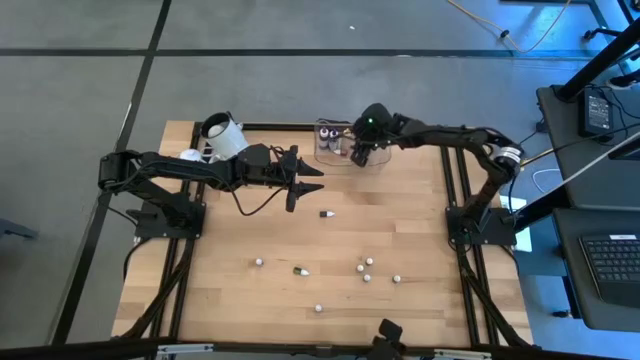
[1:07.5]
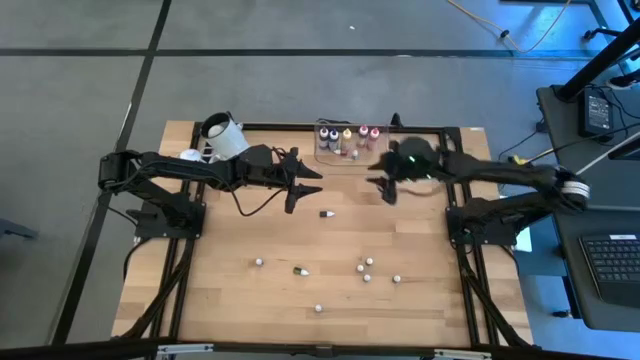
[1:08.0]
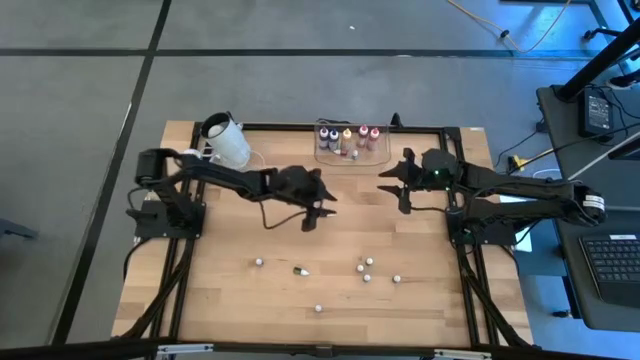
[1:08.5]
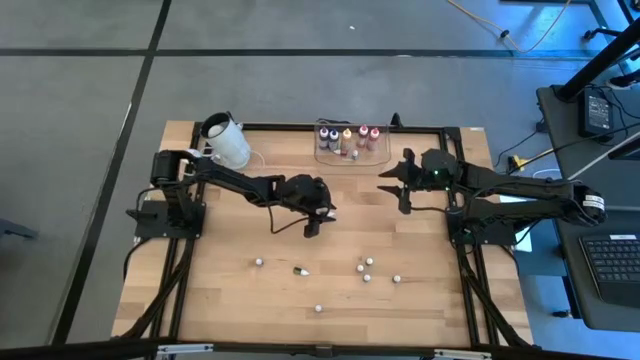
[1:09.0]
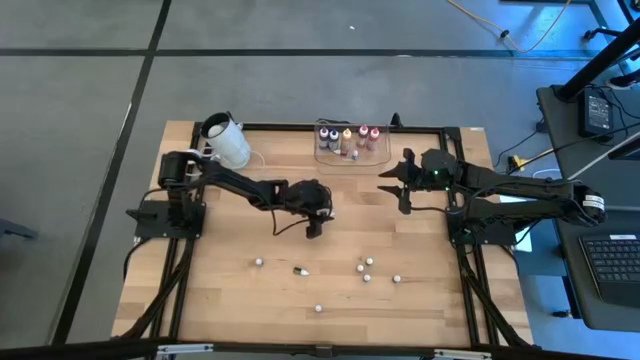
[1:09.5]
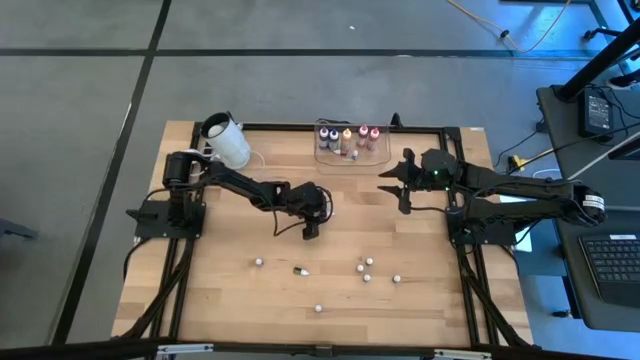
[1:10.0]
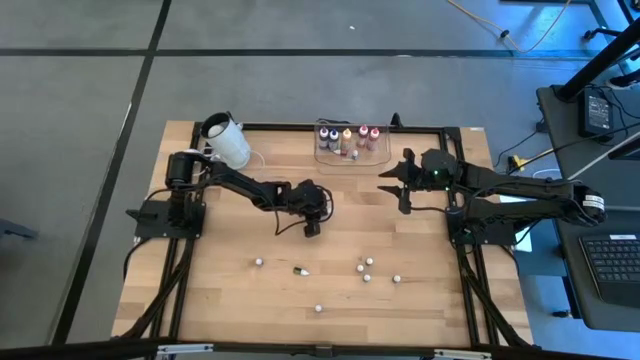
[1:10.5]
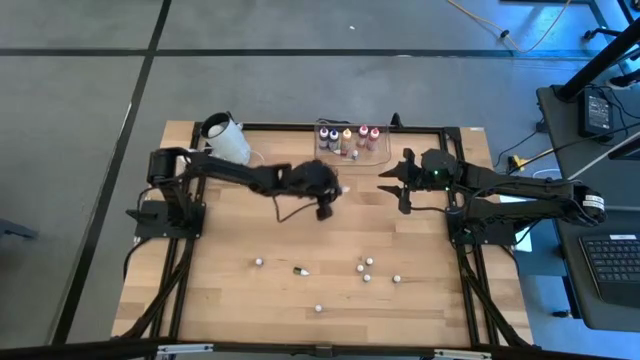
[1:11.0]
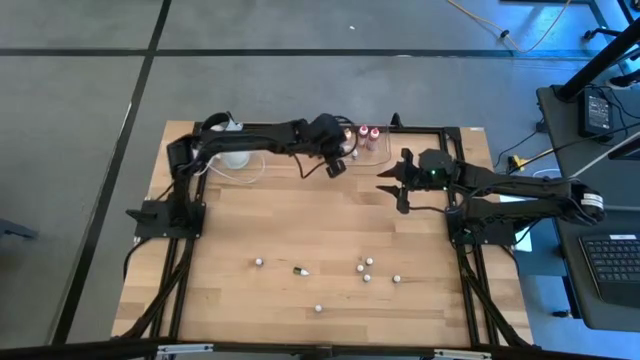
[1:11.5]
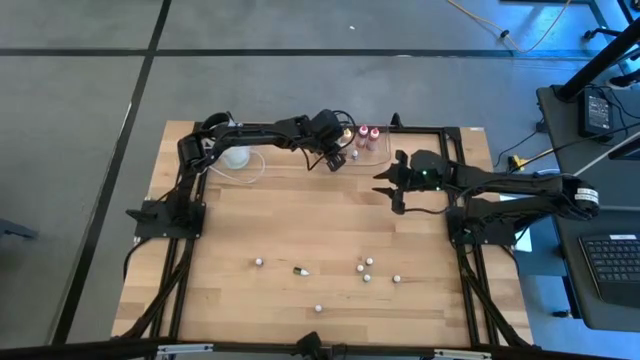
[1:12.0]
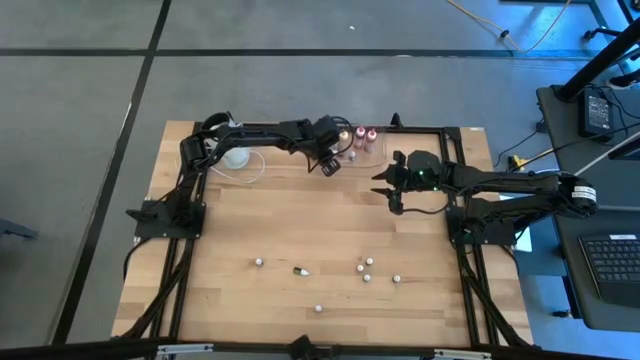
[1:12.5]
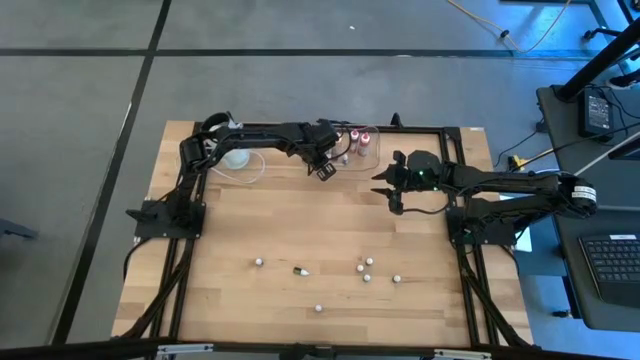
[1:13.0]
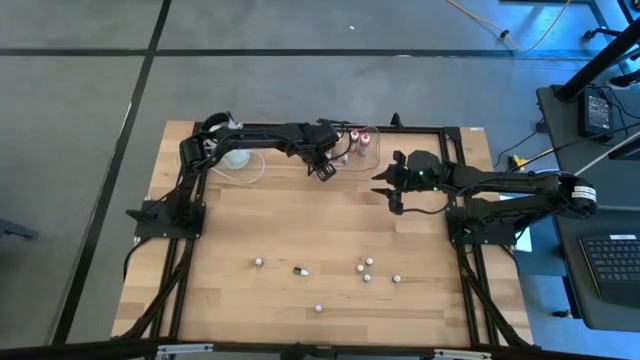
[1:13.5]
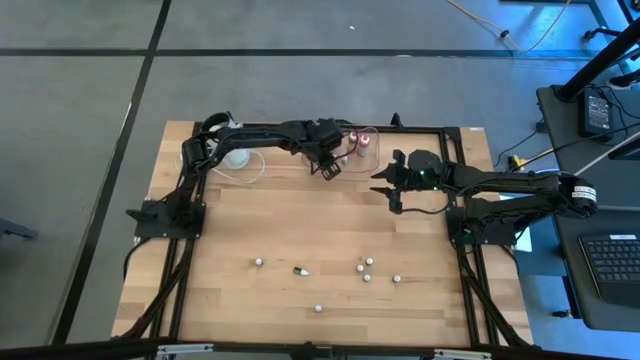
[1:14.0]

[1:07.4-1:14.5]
Task: Pick & Place food coloring
Put the small purple food coloring bottle into the transparent container

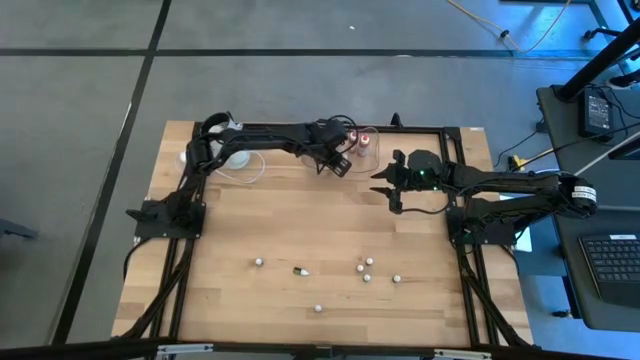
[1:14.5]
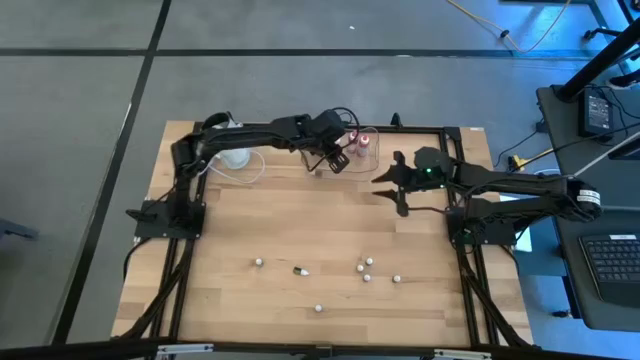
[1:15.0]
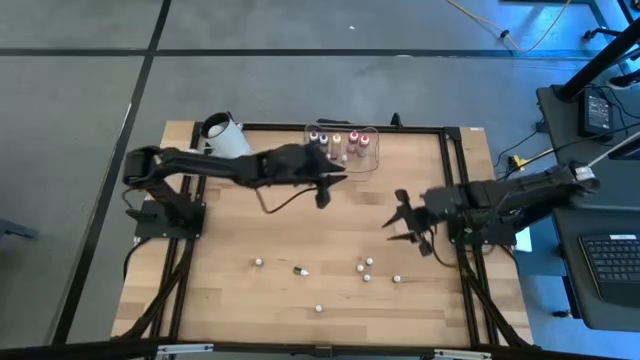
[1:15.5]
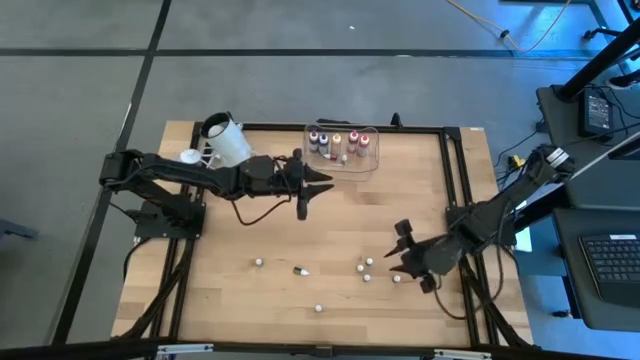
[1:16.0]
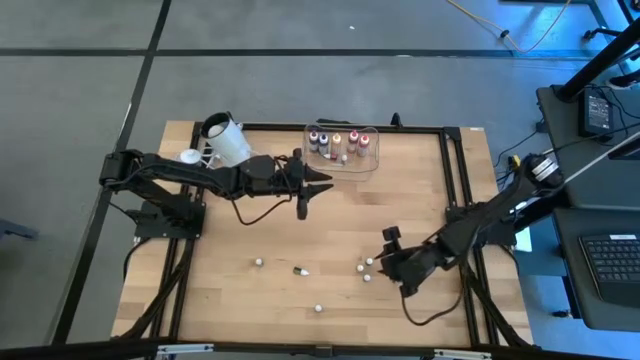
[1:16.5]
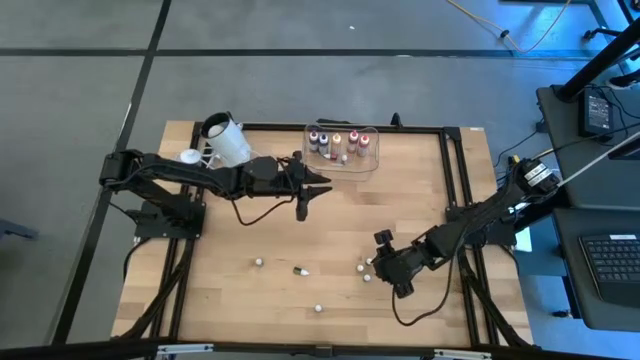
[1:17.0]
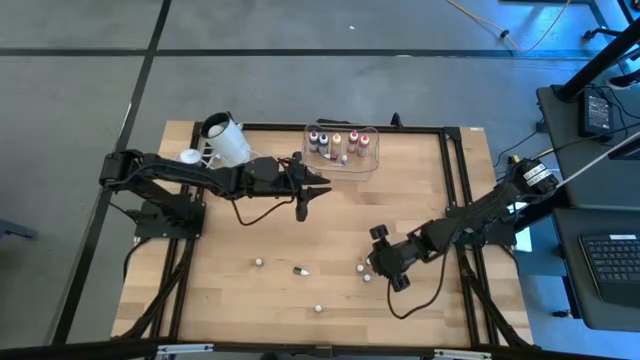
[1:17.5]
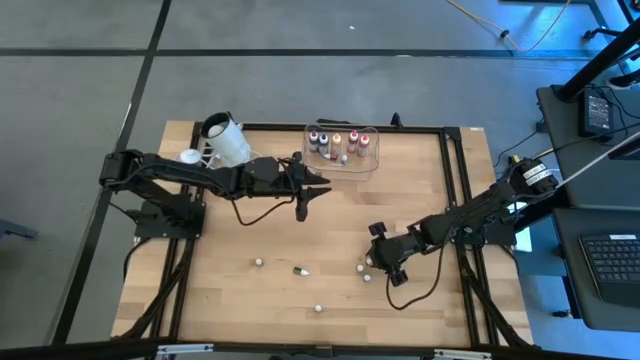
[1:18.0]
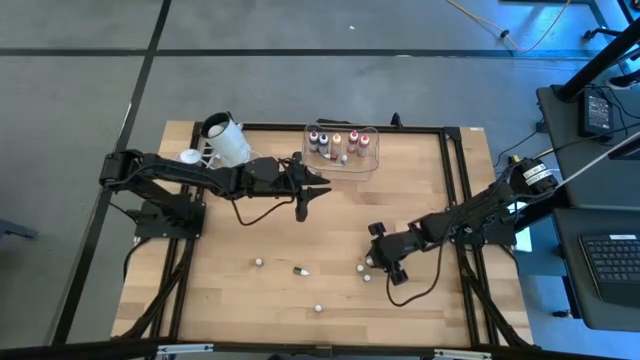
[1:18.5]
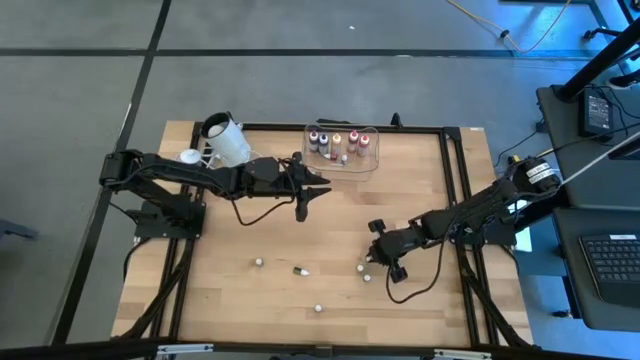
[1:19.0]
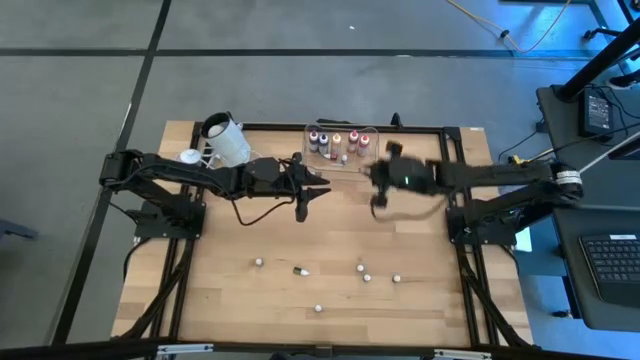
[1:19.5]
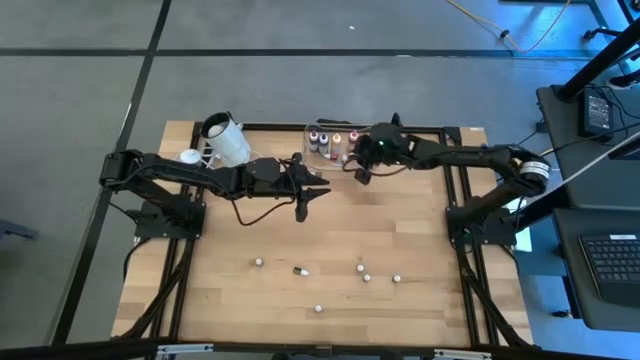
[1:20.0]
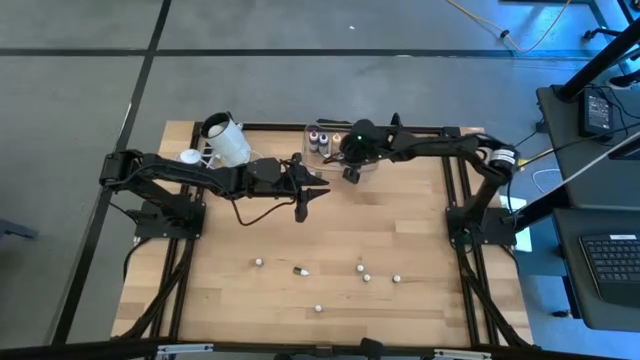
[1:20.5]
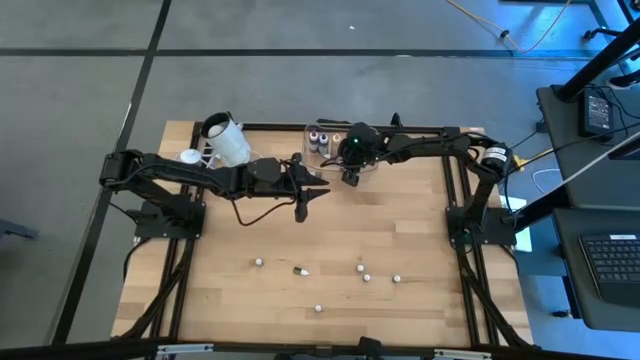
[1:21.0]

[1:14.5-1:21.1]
Put the top small blue food coloring bottle into the transparent container

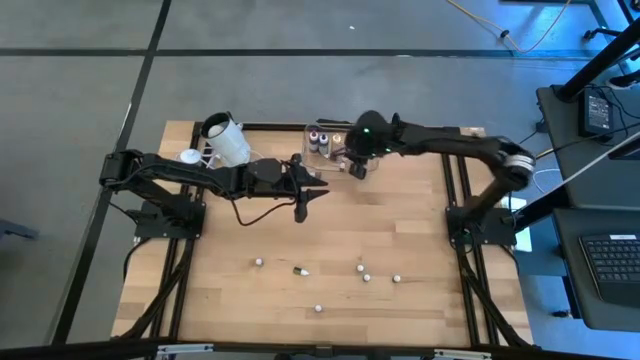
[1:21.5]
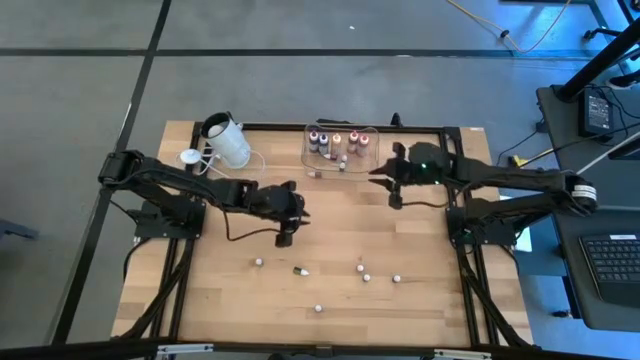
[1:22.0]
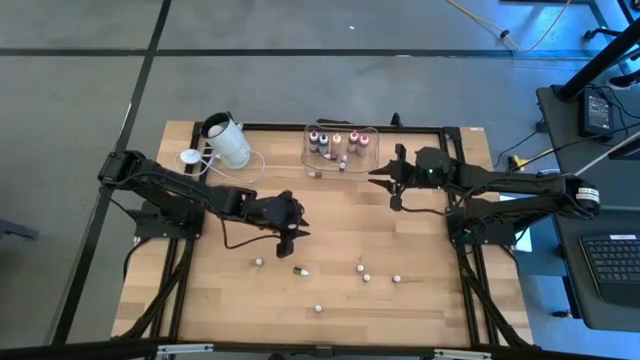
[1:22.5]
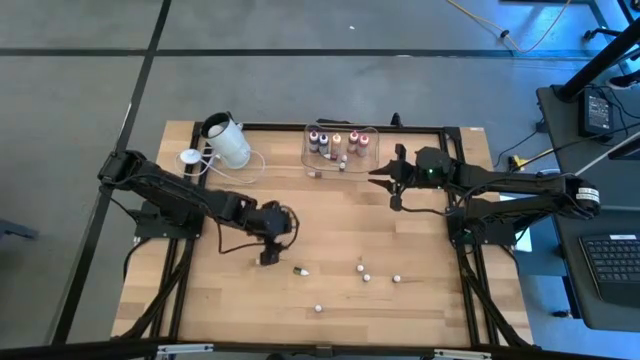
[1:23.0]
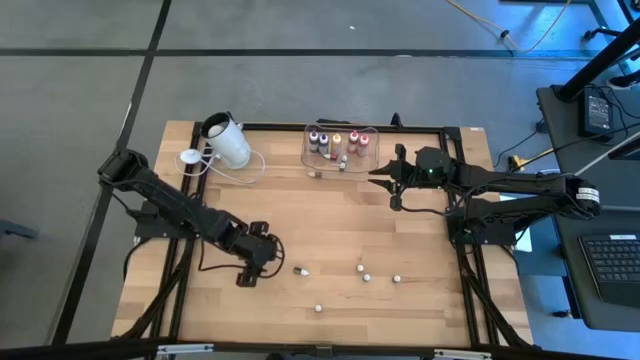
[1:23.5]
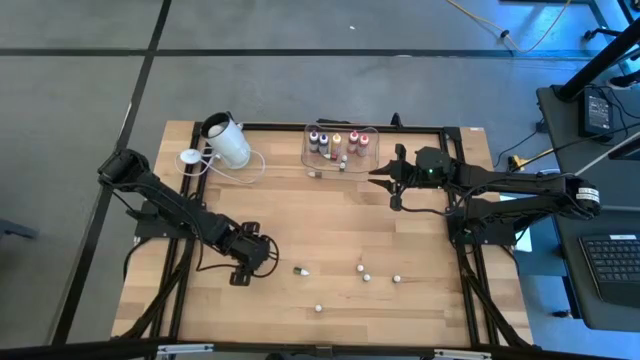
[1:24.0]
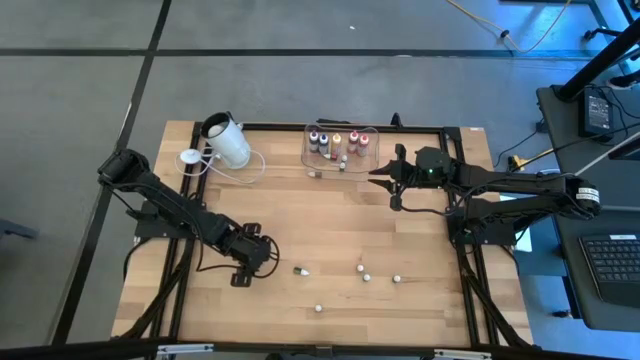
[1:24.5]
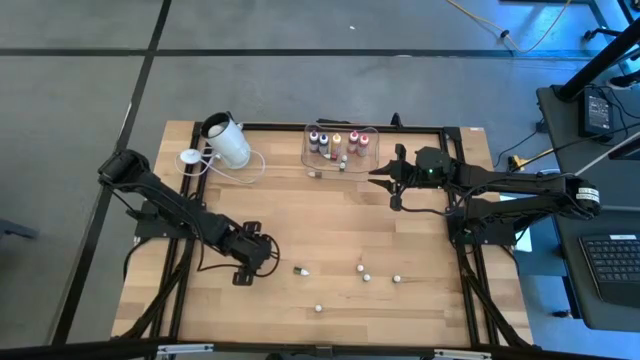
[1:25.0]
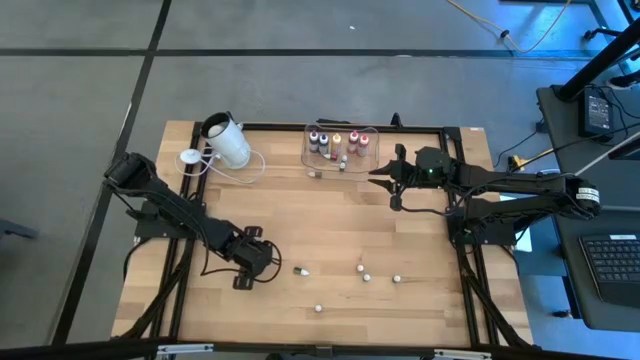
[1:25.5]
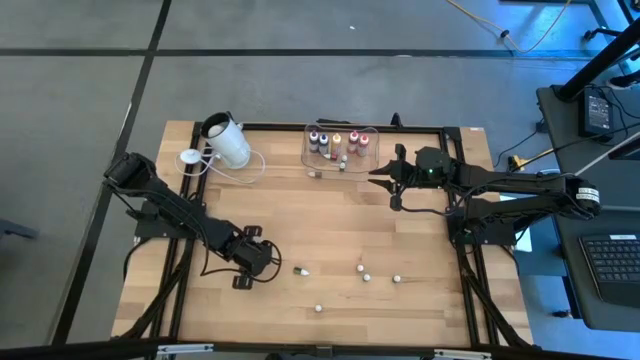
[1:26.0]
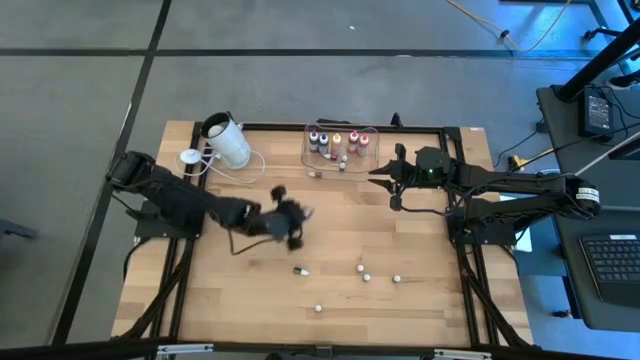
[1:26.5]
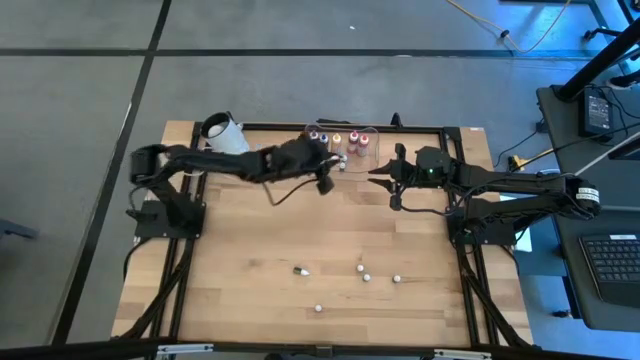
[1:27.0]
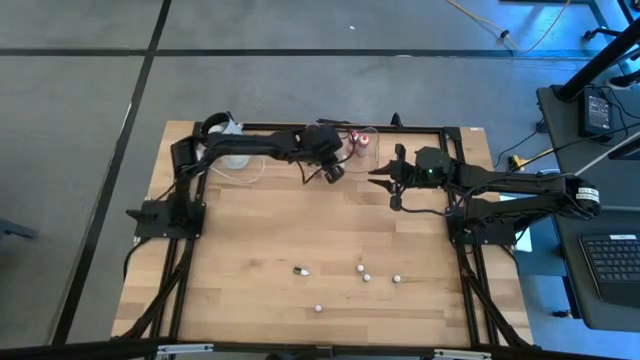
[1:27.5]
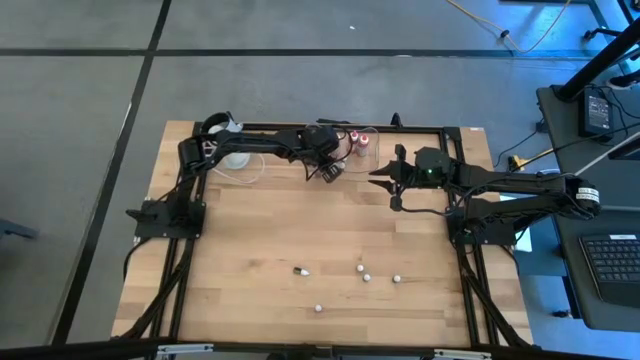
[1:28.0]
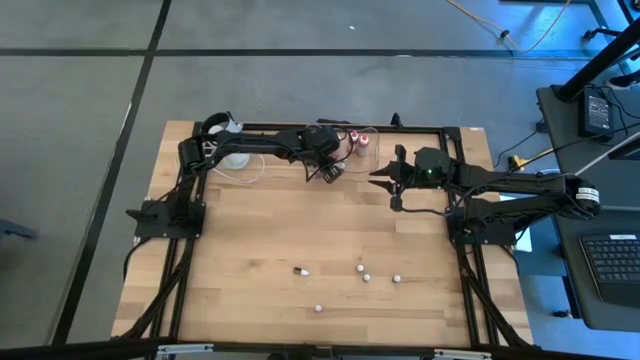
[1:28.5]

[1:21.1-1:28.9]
Put the small black food coloring bottle into the transparent container
